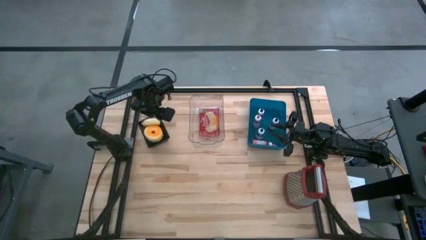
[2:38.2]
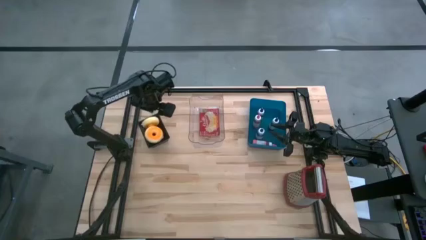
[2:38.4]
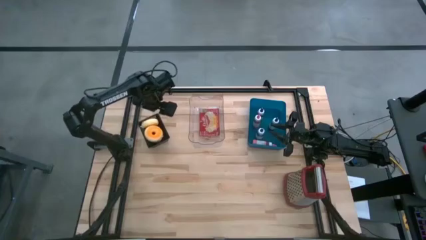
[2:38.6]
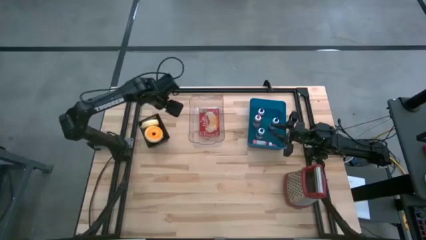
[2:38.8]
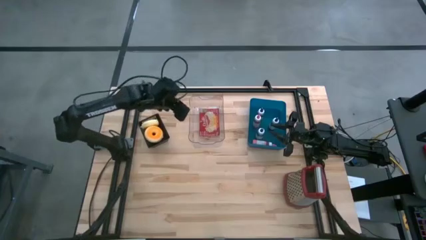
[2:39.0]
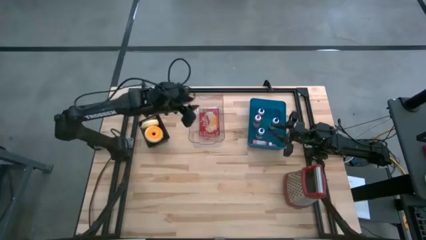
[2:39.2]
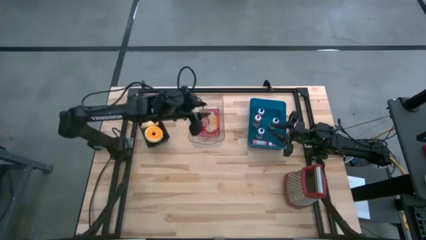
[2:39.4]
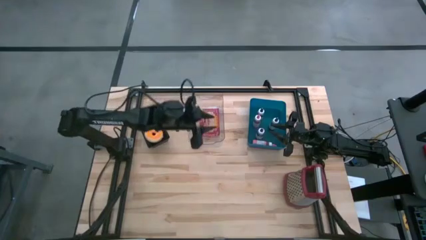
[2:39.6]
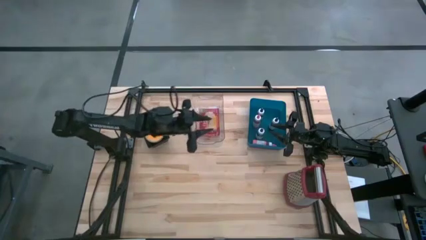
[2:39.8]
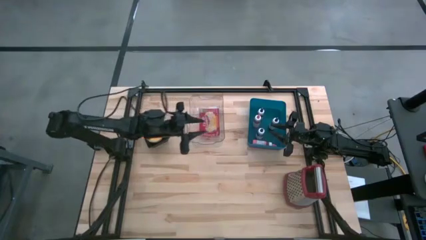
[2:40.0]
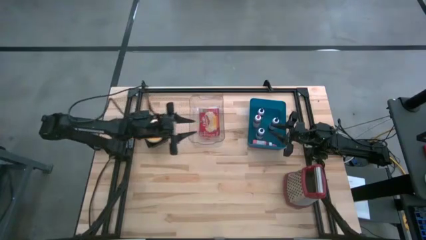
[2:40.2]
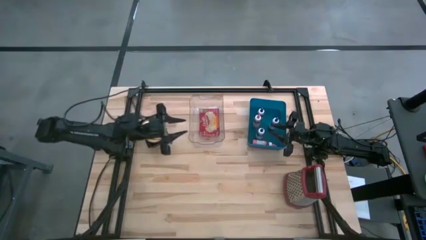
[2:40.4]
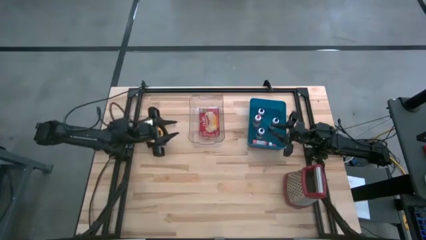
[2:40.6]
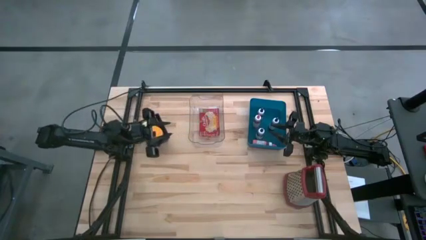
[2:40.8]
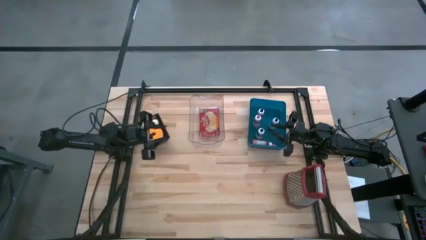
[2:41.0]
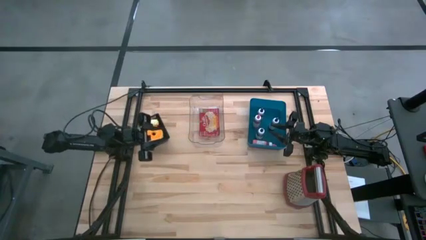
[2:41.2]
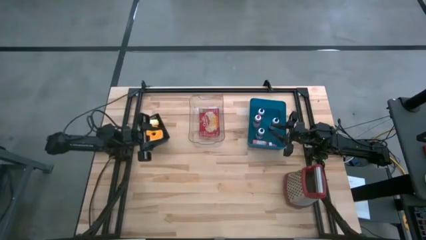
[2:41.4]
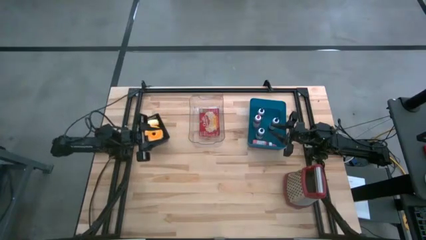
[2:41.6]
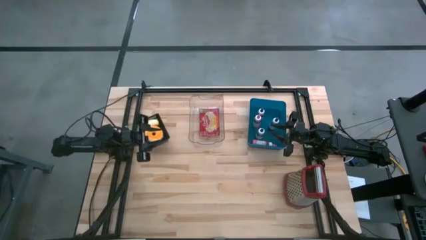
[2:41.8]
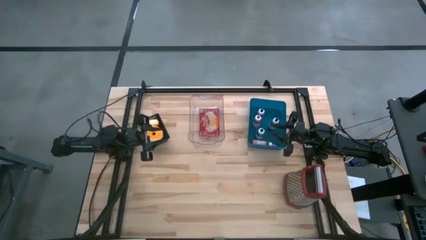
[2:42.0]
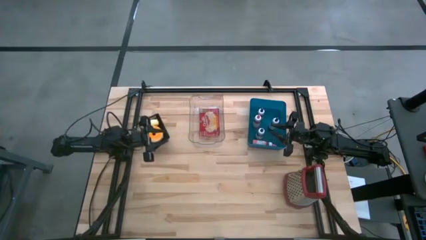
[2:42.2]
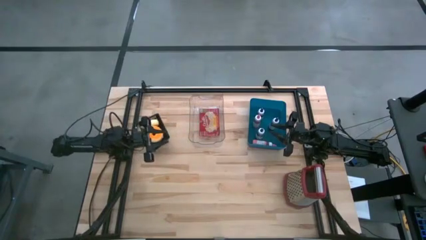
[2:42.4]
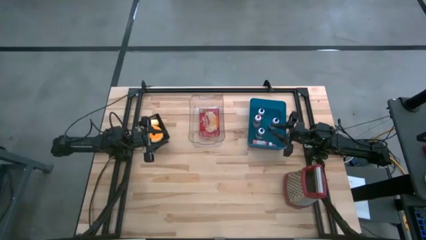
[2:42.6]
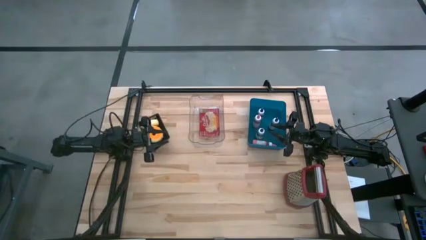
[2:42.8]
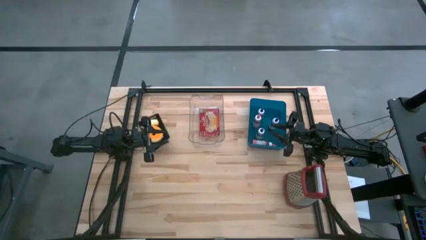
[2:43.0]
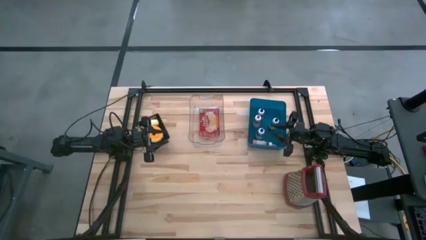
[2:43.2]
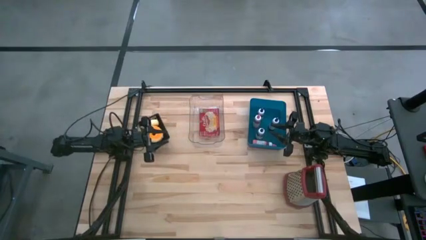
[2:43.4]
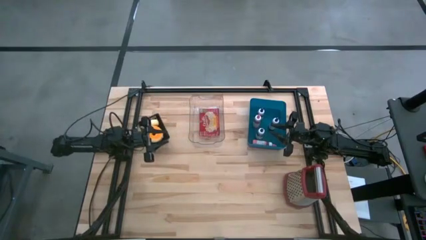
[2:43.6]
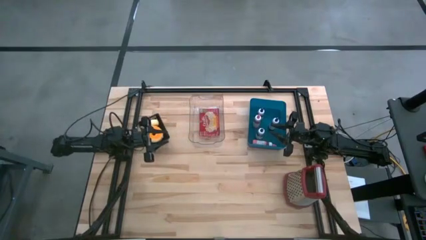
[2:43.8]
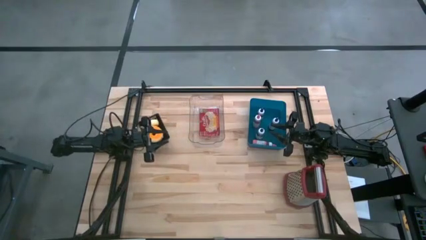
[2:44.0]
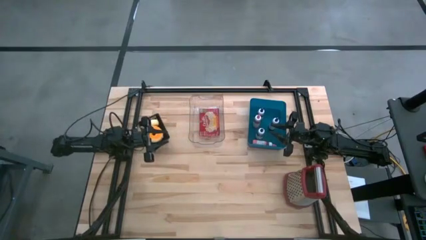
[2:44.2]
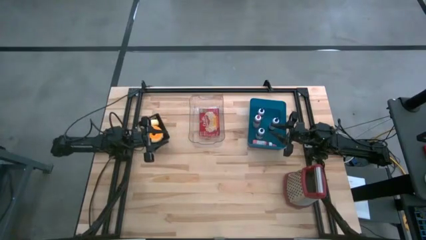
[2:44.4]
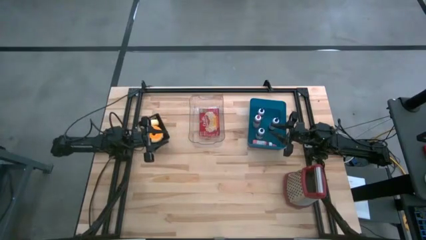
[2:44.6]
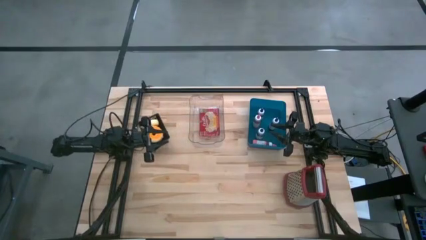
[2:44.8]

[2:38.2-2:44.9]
Task: Pick & Place Food Item
Return to Home Position
